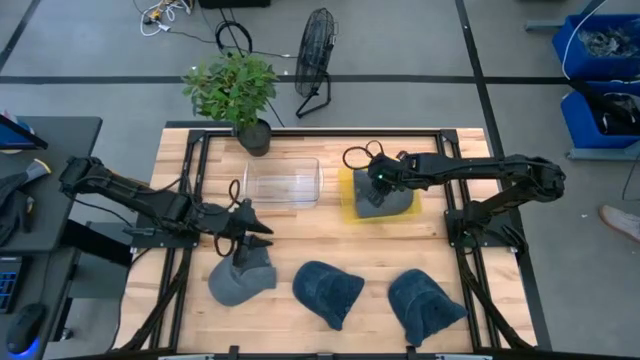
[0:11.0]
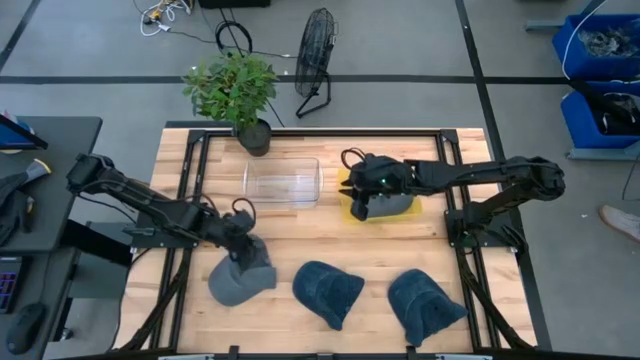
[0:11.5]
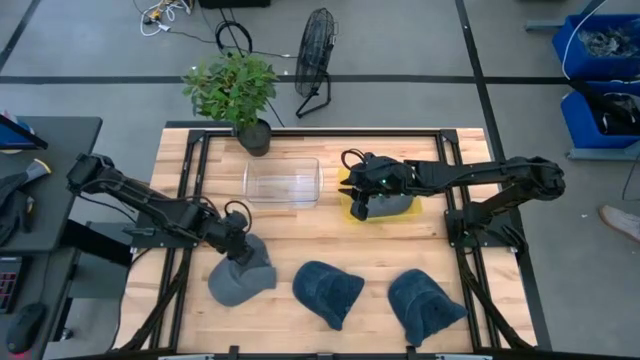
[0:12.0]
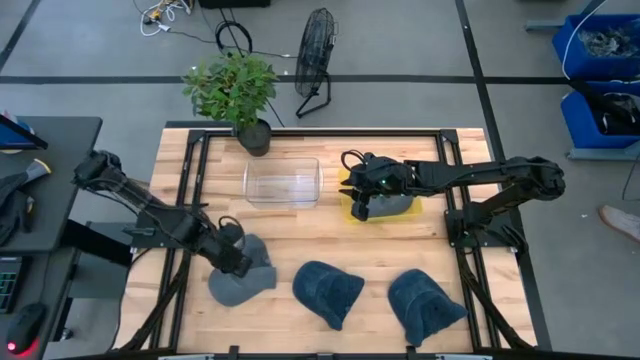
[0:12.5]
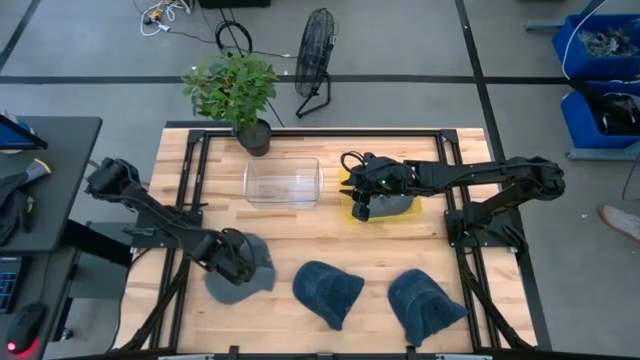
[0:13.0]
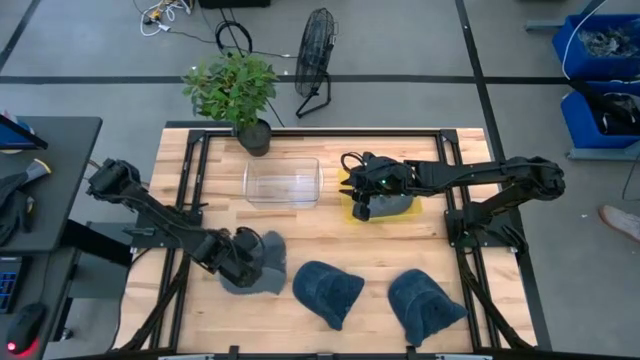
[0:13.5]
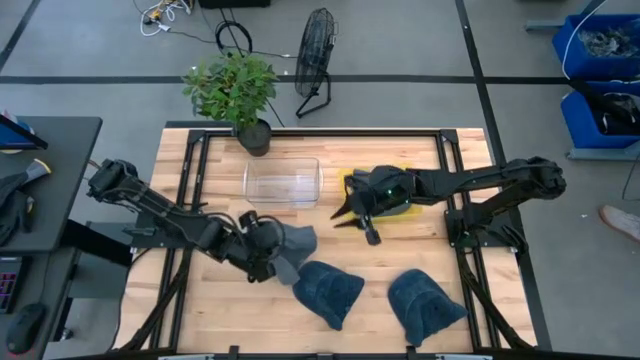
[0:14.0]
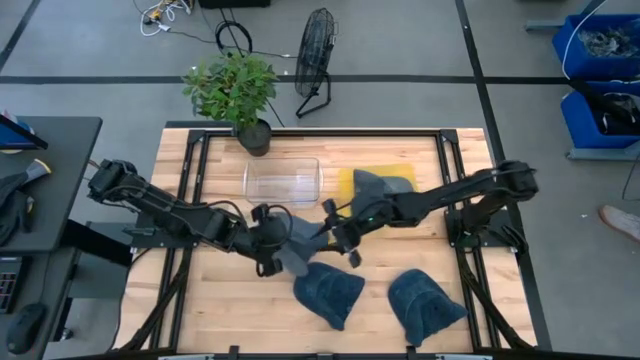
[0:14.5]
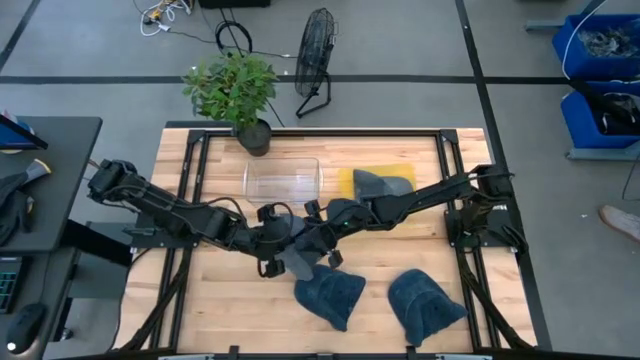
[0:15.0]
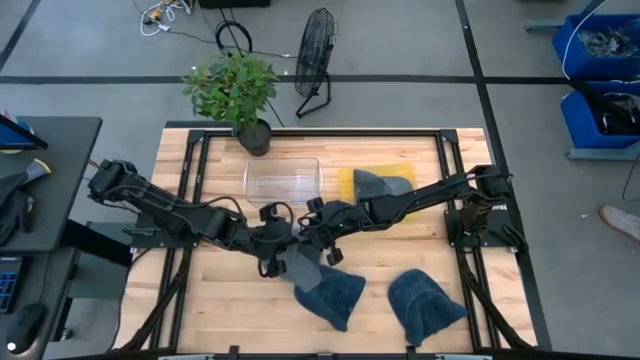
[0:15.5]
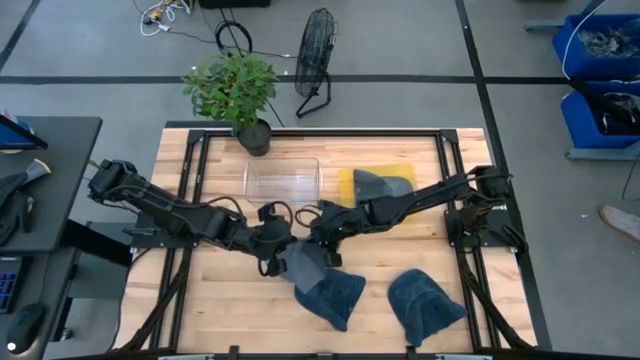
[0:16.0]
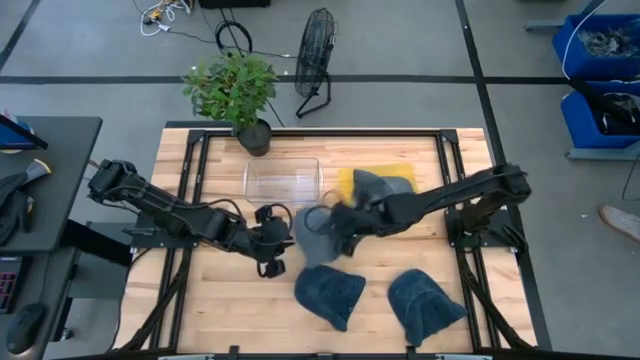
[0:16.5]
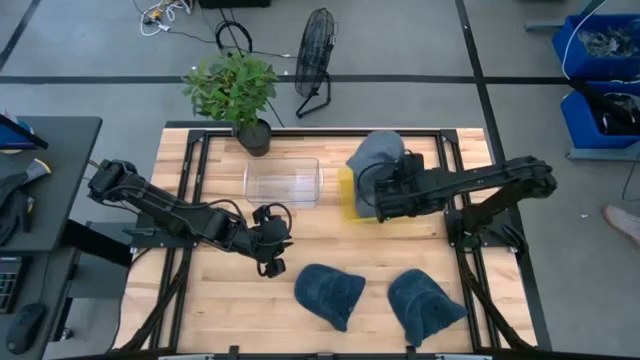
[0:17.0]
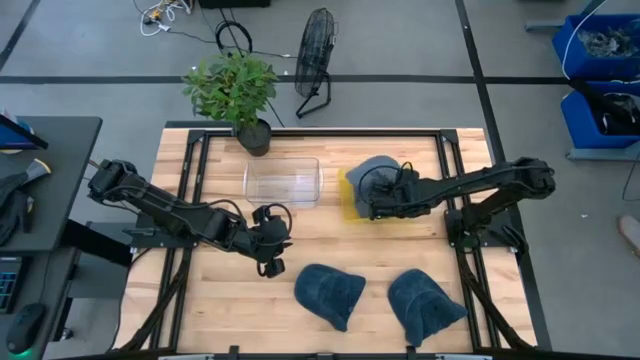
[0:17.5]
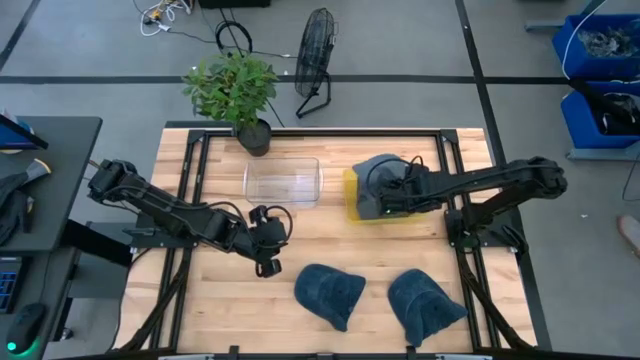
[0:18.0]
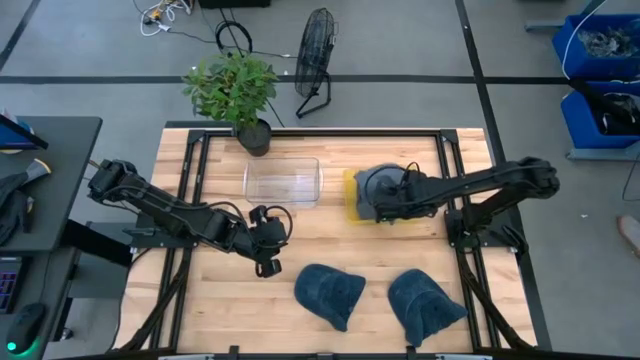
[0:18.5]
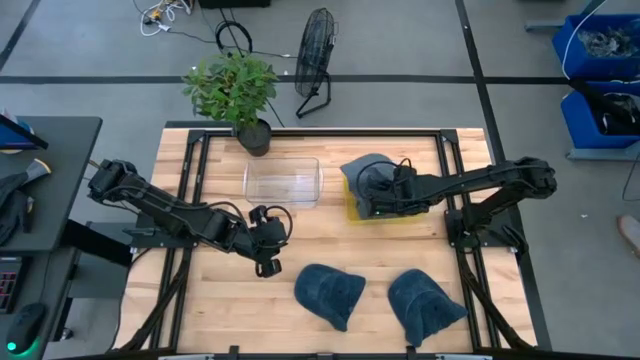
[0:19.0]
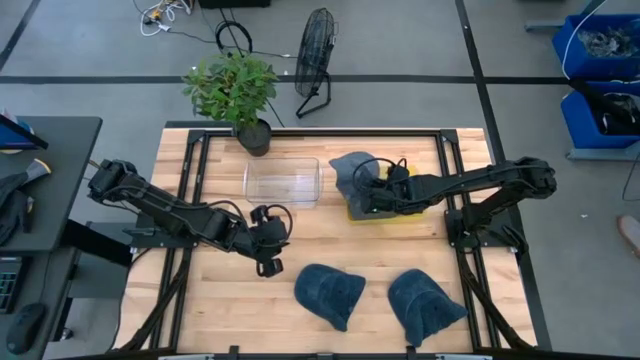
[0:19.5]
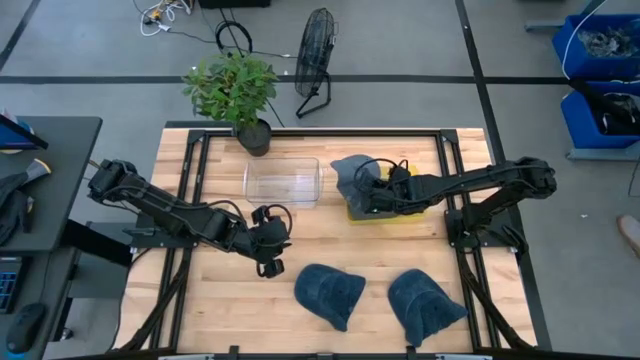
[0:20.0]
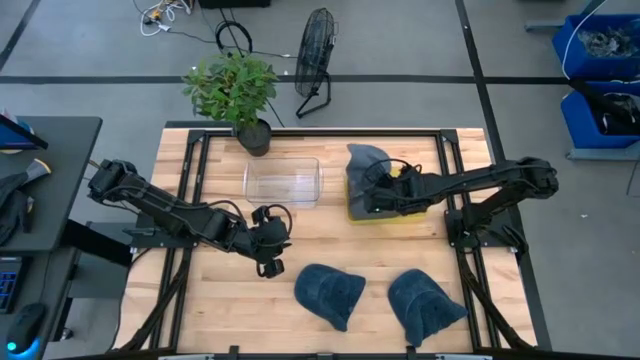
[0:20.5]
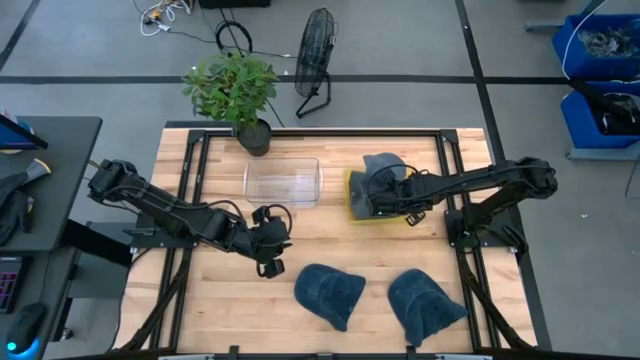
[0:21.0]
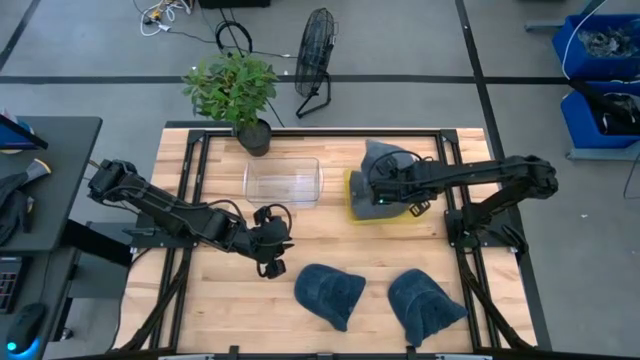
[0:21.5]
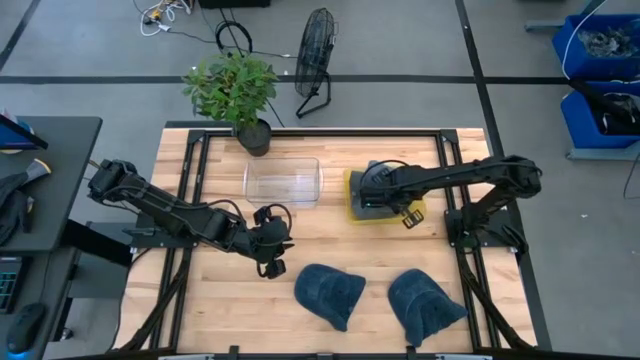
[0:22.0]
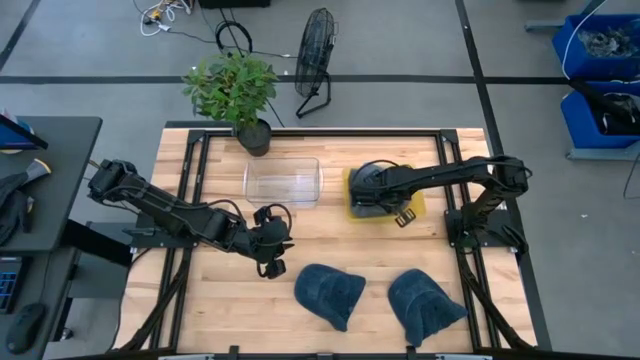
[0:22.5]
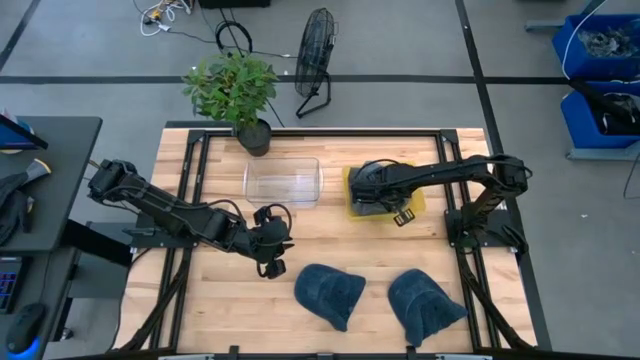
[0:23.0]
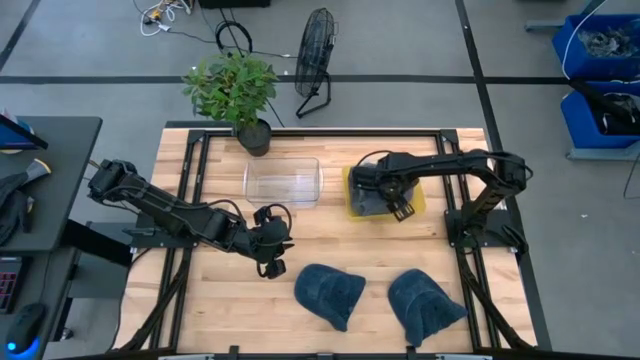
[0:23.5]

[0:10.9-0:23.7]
Task: Pick & Place hat
Put the gray cap into the yellow bin

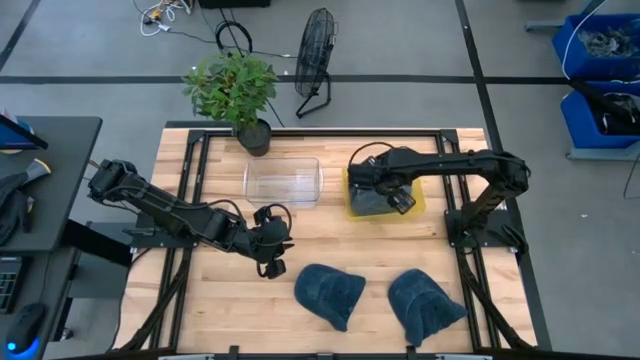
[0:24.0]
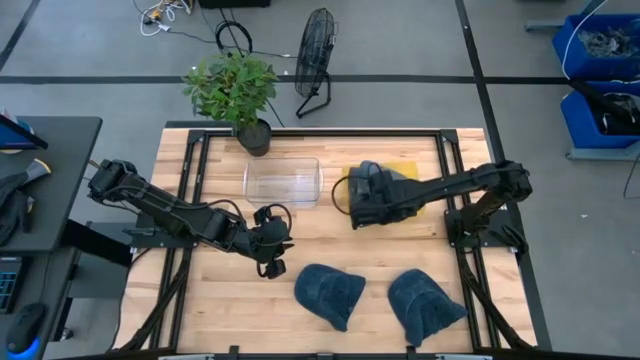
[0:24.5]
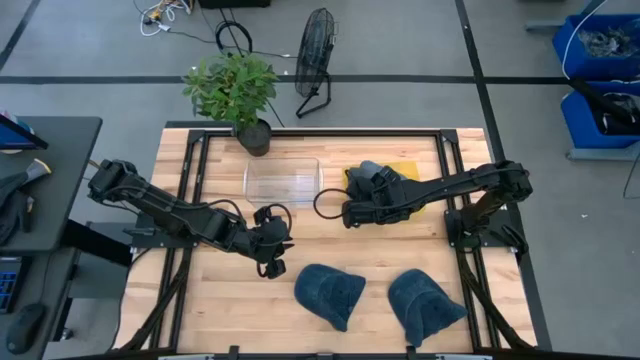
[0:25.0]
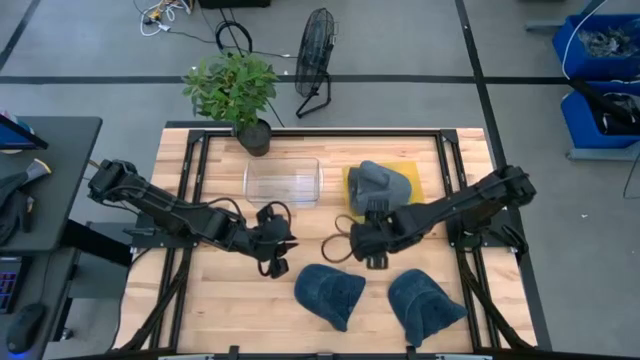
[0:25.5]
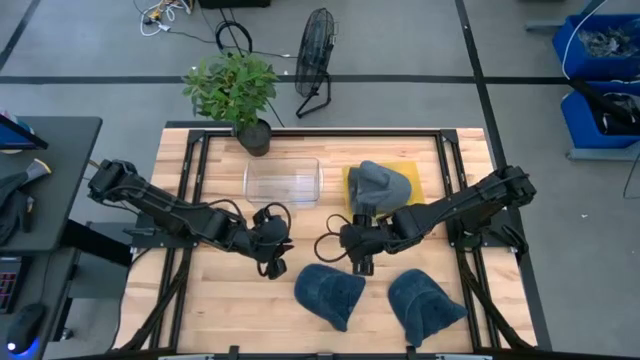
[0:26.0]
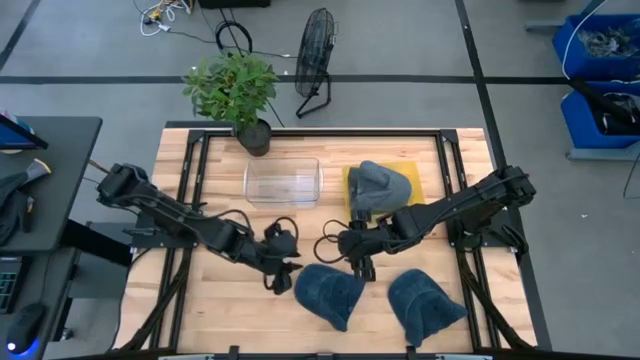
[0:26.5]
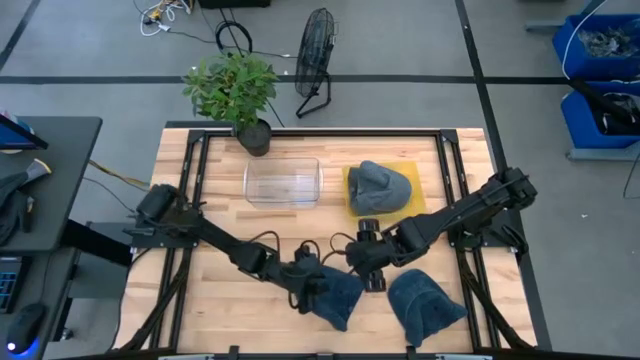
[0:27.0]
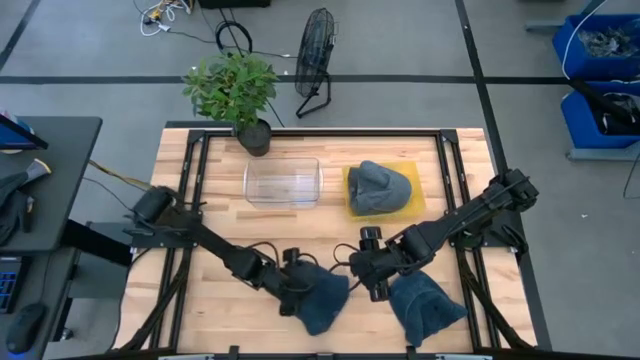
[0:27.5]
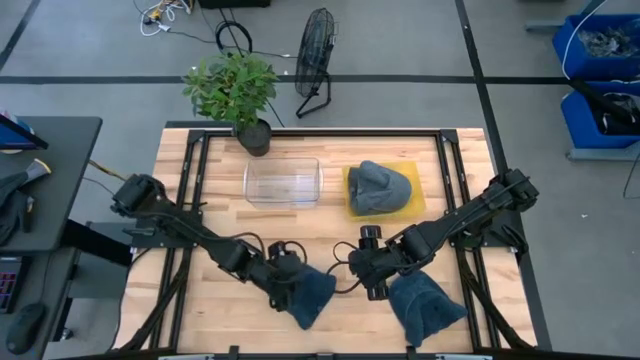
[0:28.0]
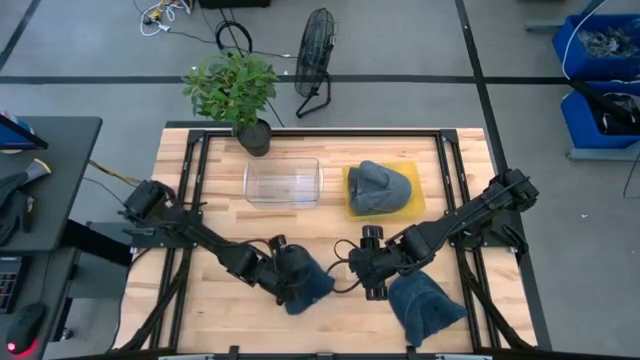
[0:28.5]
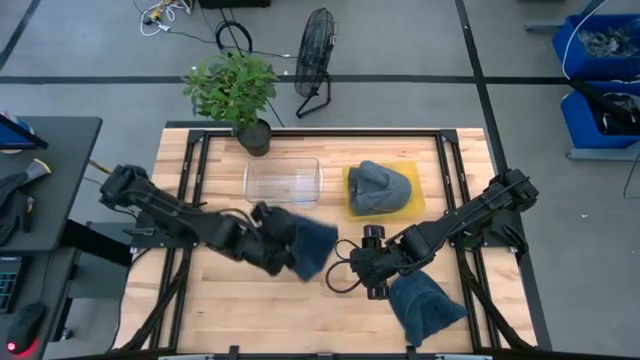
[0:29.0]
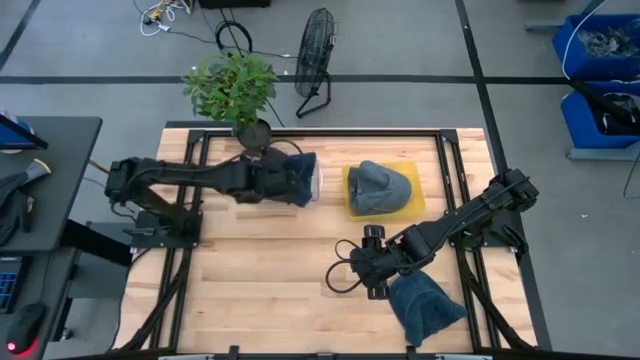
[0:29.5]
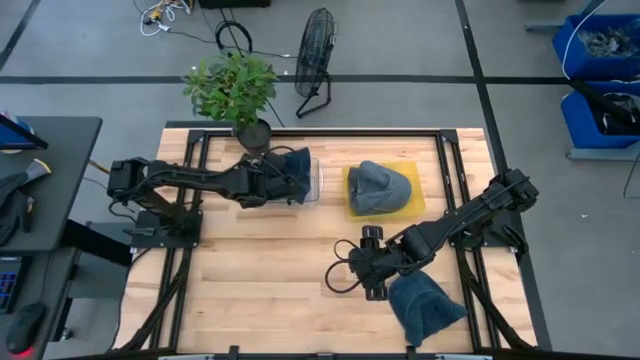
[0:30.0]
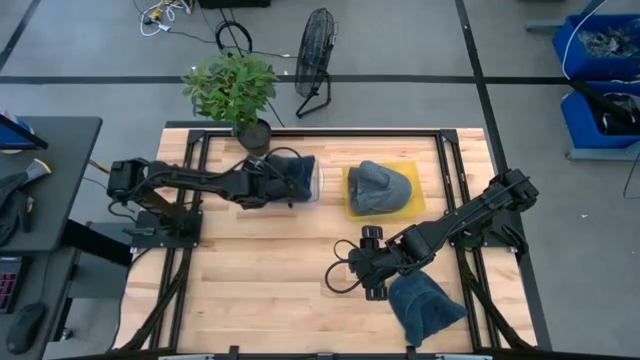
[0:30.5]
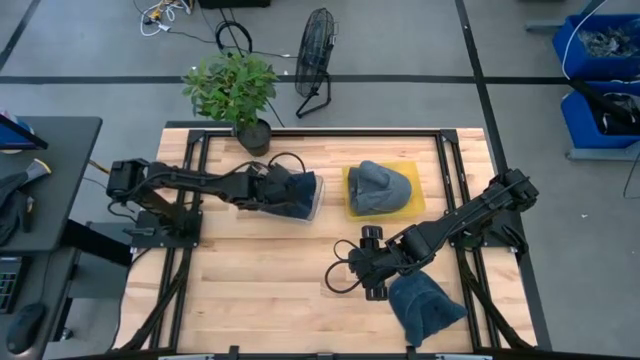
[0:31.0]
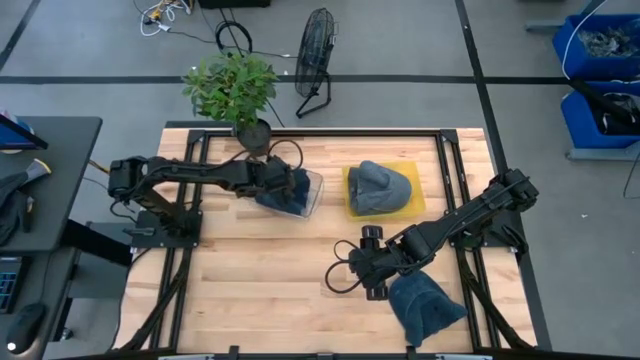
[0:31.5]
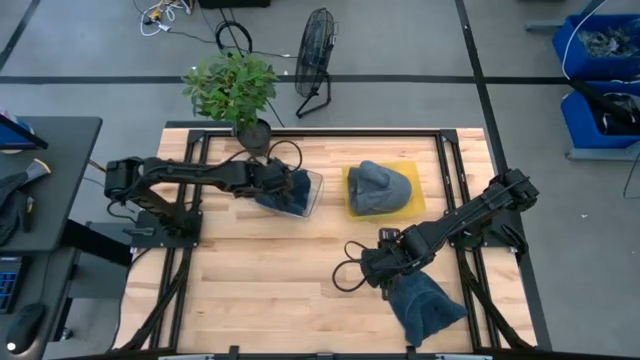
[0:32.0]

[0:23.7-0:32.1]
Put the left blue cap into the transparent bin
